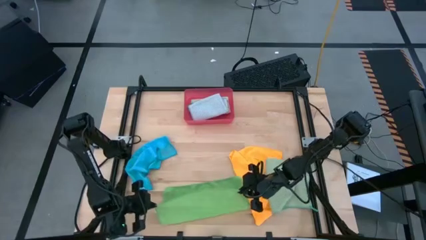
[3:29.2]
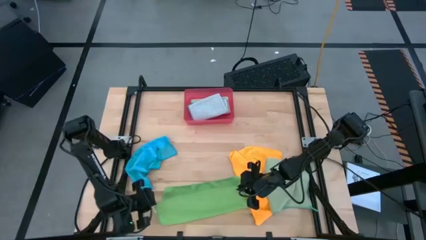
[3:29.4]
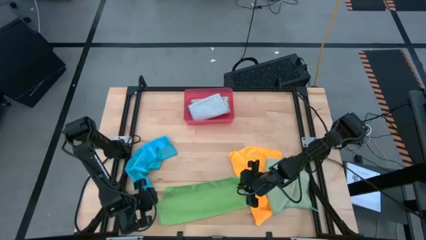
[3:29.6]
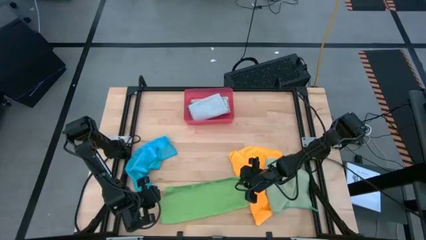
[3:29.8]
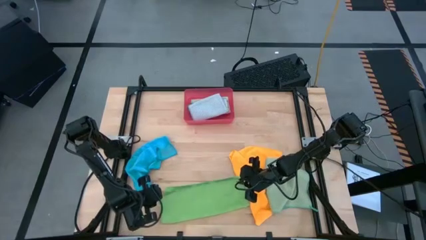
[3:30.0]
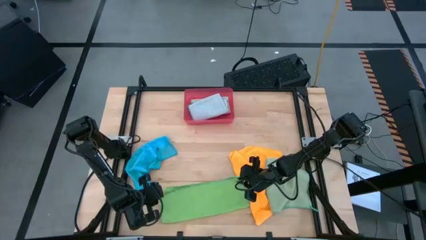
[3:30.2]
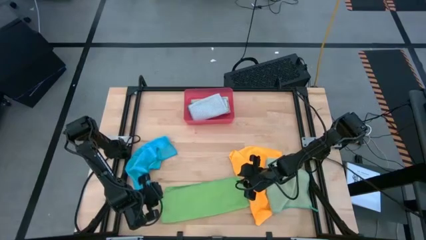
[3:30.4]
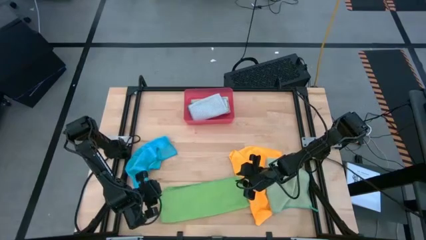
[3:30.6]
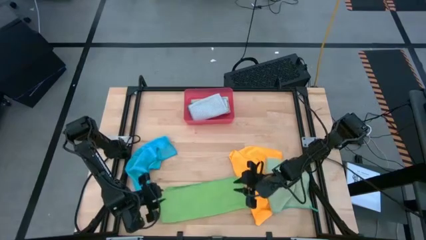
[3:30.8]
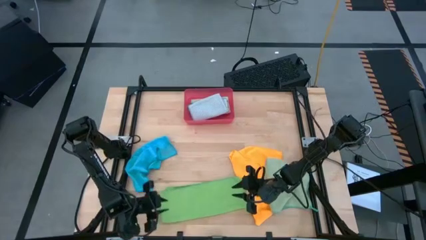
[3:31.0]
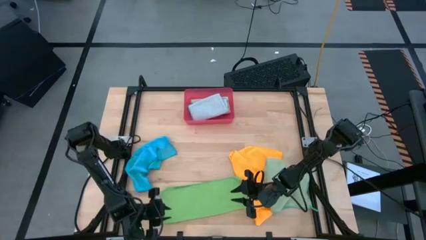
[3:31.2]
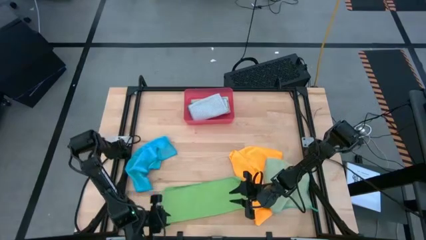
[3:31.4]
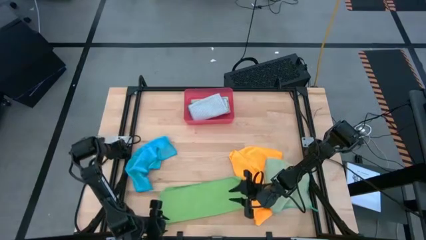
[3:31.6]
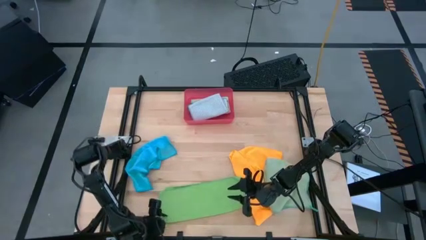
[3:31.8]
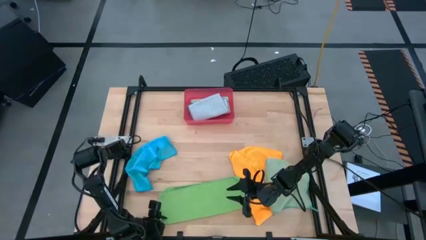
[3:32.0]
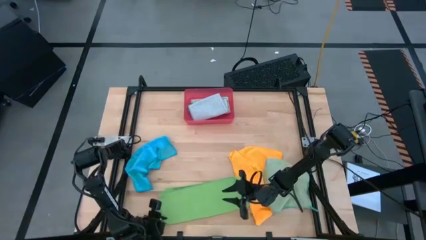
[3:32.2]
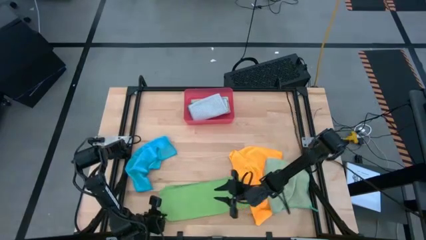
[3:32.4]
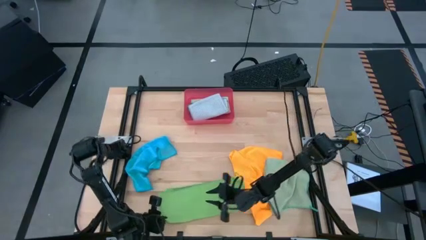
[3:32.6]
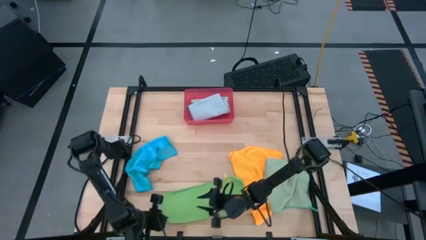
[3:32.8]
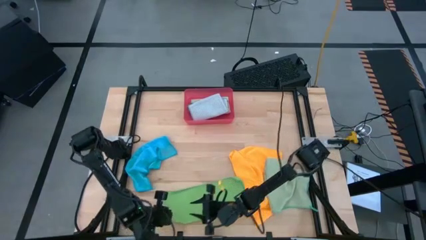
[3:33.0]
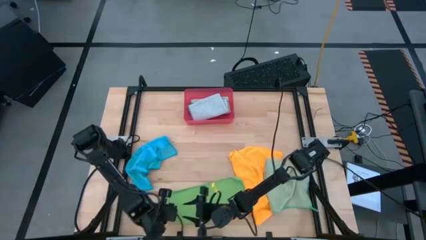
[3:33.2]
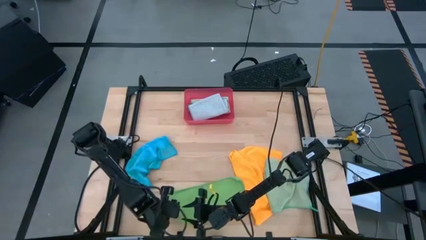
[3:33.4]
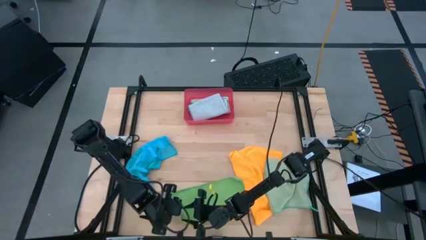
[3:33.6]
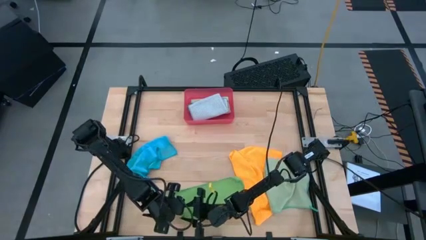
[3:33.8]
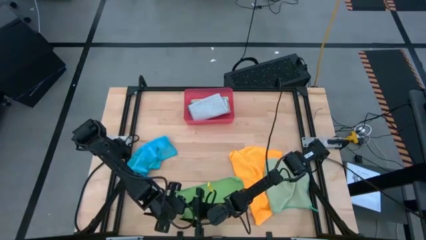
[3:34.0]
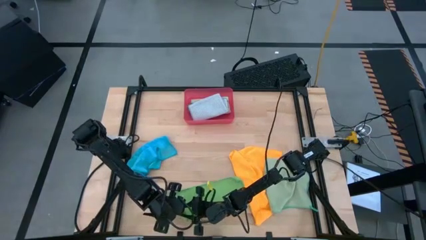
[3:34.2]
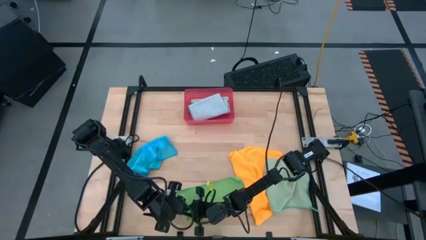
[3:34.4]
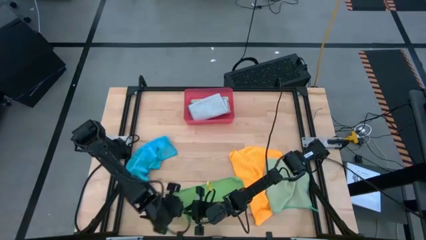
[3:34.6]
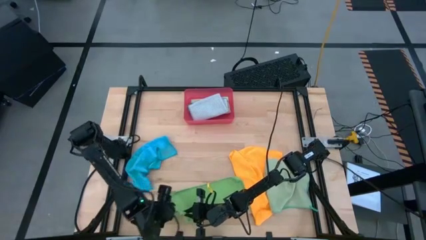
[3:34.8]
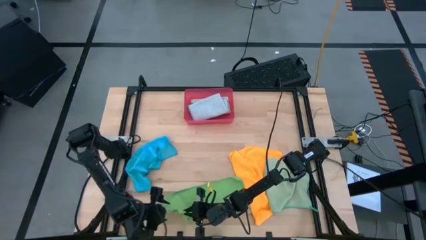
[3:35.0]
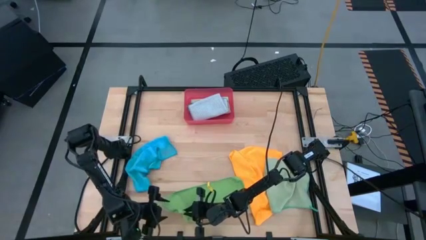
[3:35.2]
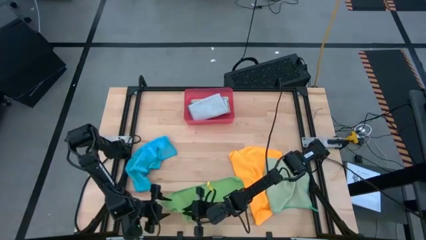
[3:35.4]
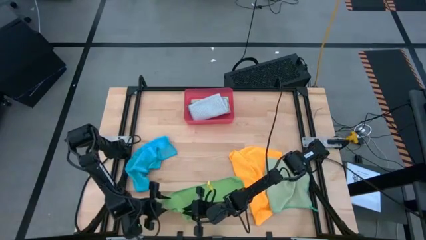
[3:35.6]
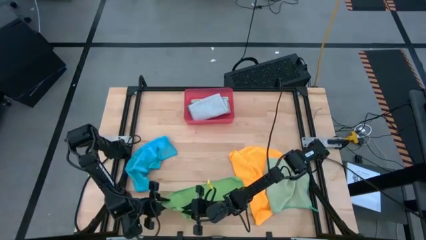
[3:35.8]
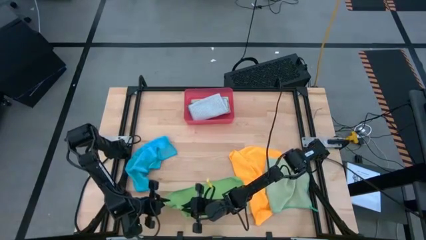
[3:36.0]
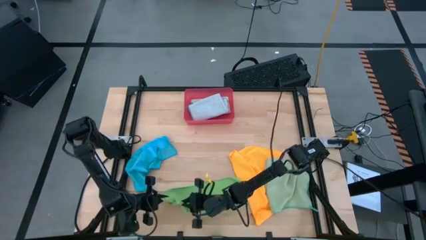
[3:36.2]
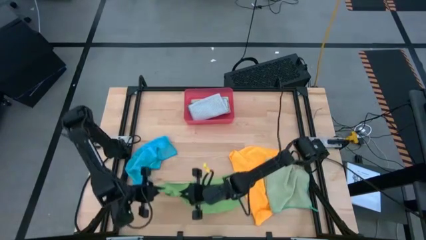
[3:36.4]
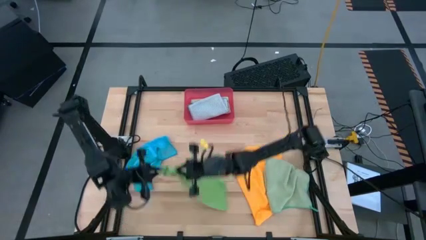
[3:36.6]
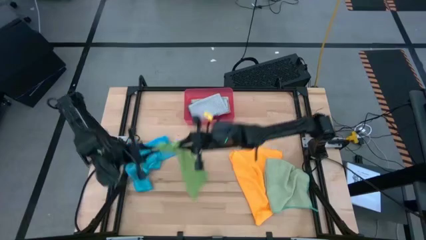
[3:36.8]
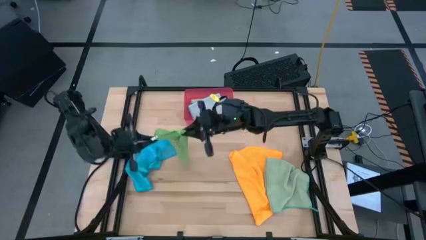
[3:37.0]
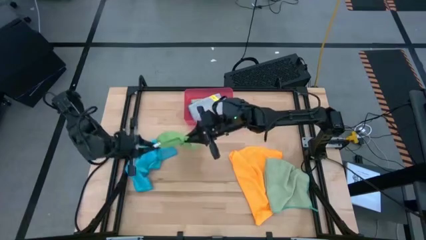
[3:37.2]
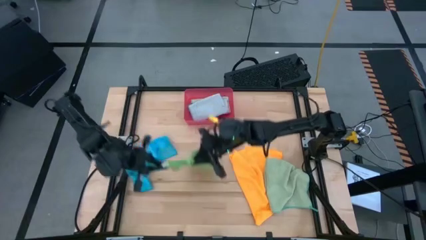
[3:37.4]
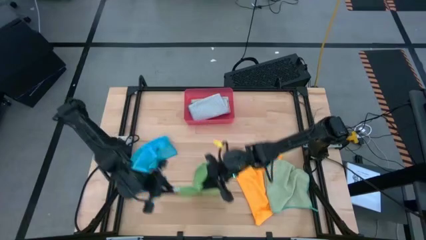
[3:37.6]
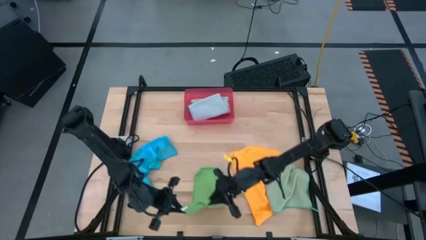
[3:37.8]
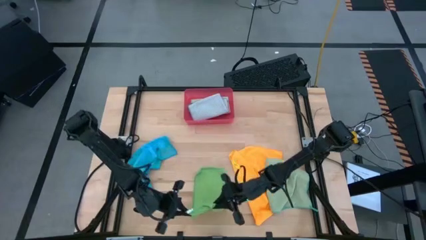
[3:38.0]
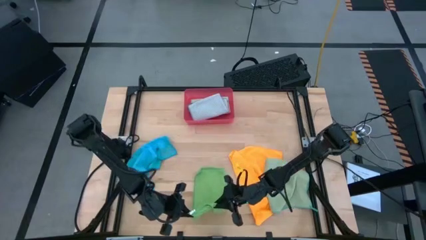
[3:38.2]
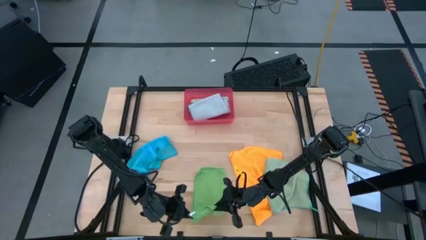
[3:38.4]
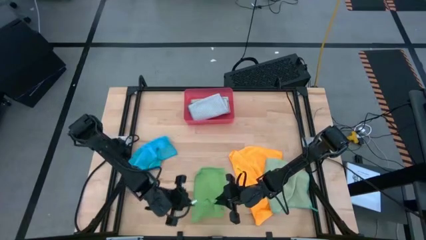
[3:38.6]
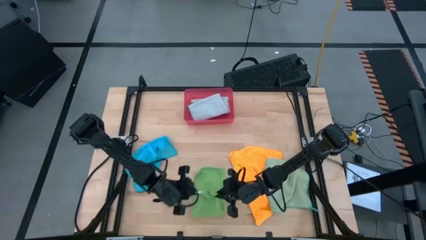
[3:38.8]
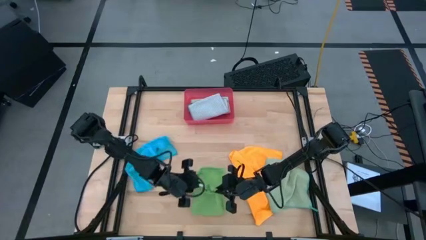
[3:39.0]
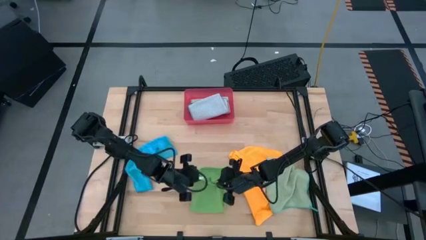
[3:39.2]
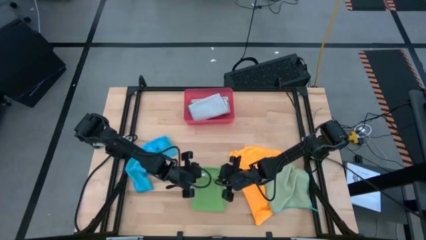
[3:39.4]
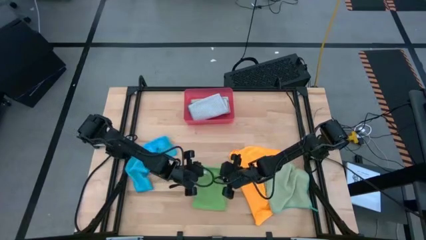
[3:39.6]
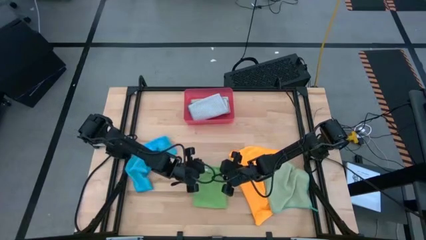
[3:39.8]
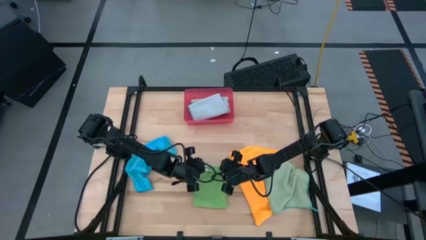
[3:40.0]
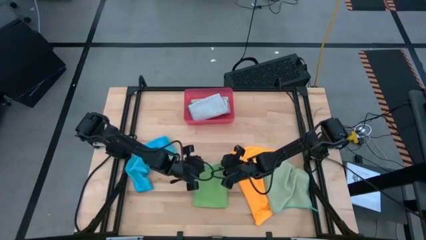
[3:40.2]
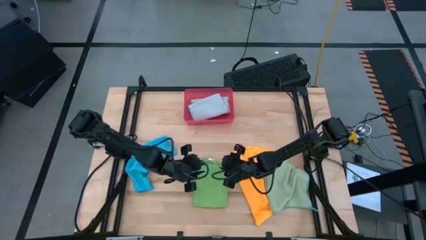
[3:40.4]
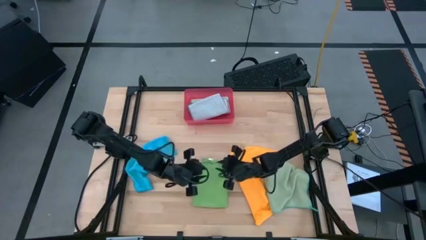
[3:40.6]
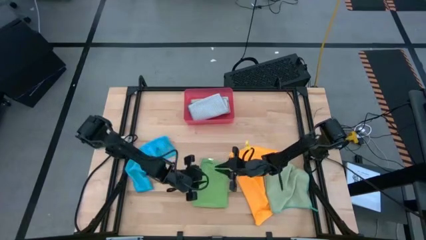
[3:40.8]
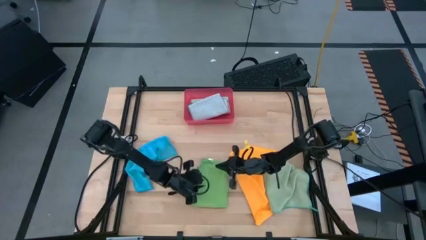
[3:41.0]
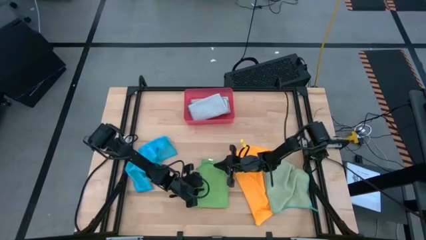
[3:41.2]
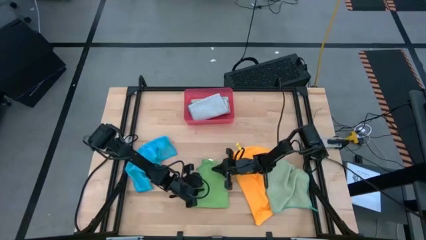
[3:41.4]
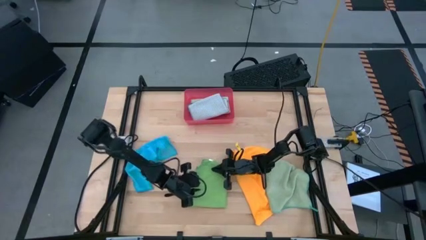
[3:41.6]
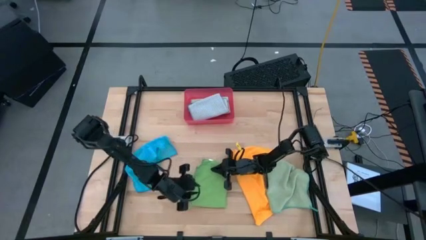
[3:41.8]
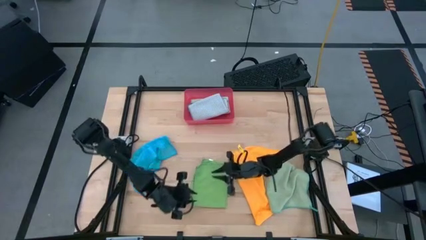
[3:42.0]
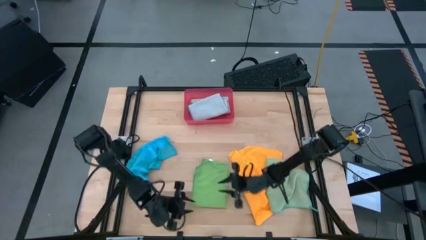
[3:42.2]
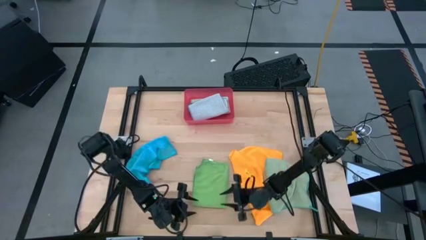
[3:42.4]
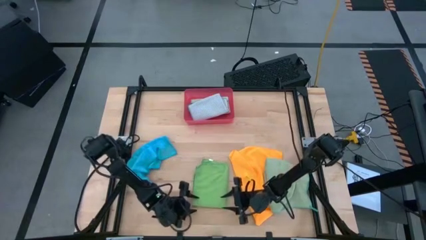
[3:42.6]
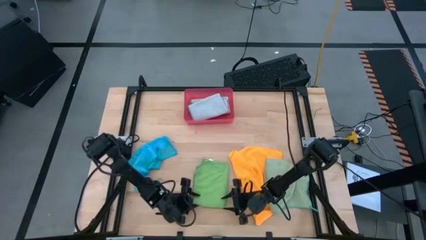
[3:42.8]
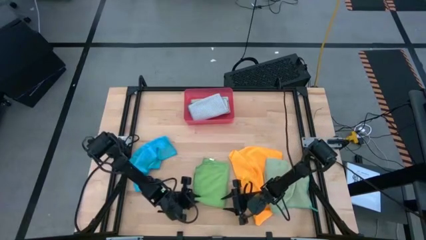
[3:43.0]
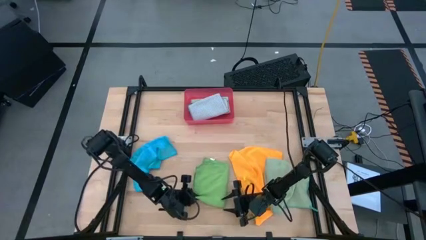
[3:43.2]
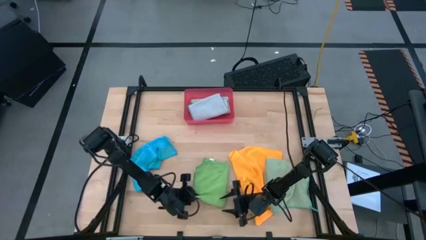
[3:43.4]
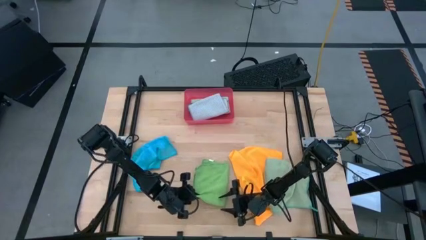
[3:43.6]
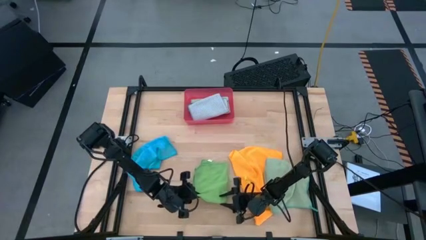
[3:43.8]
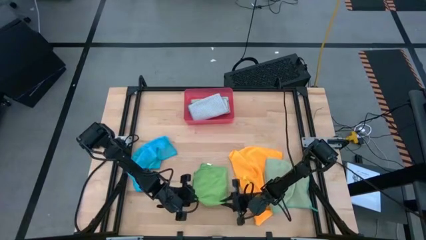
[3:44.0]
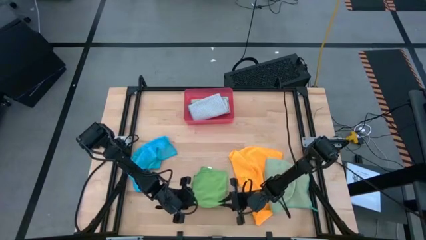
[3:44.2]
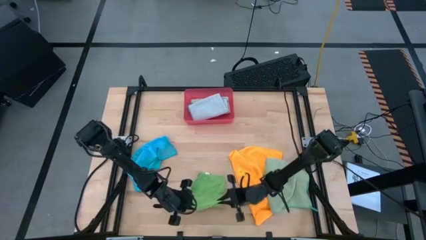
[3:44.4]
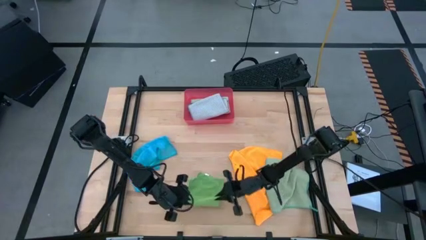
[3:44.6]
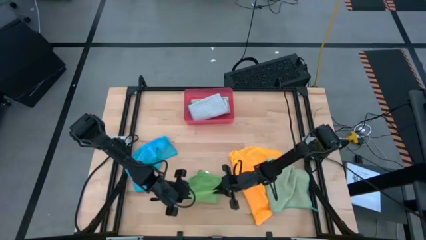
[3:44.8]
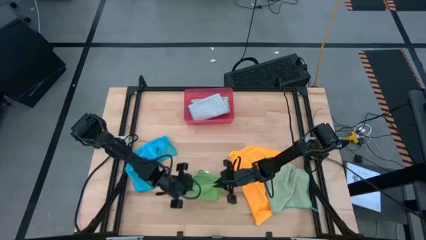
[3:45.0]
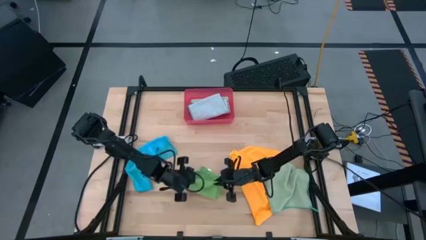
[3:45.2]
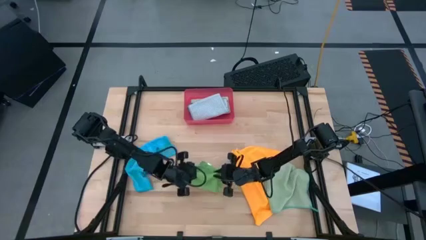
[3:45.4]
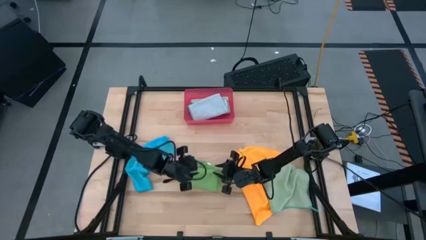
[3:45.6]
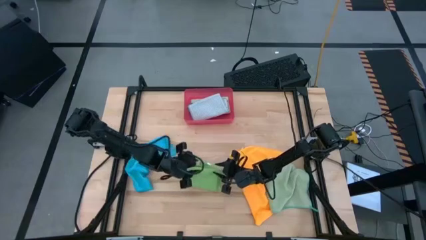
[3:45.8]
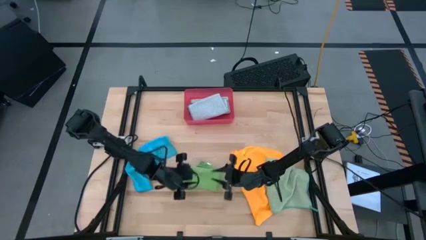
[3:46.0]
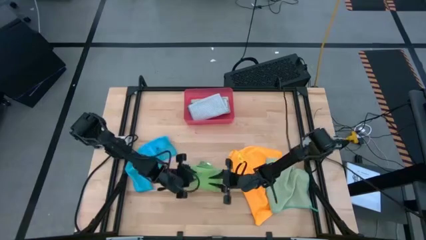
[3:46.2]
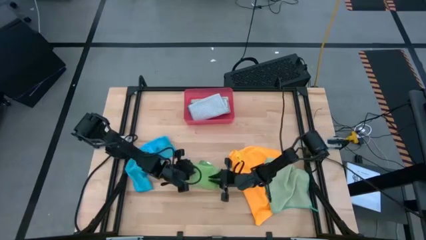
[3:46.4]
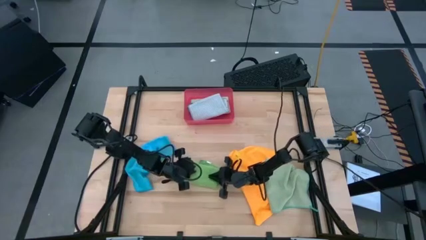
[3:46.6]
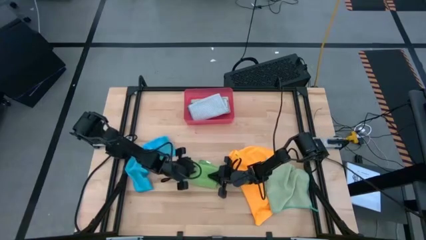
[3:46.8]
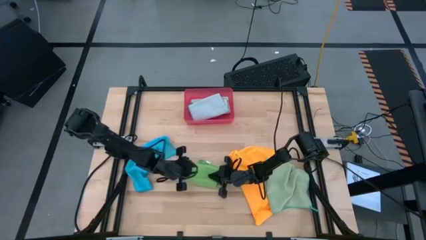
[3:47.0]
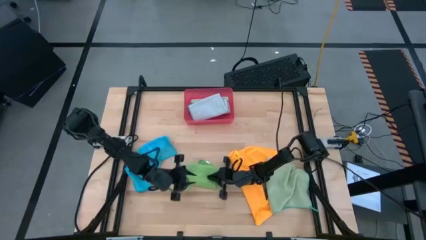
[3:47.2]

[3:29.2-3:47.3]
Task: Fold microfiber towels
Fold the green towel
